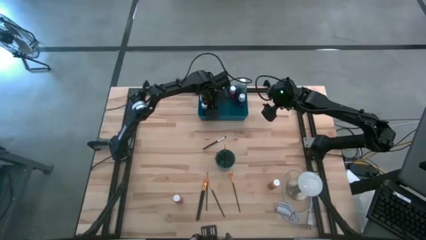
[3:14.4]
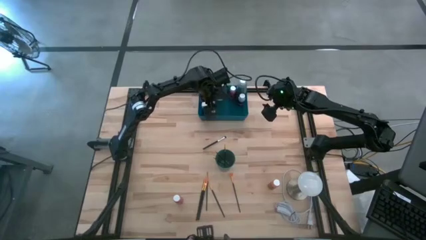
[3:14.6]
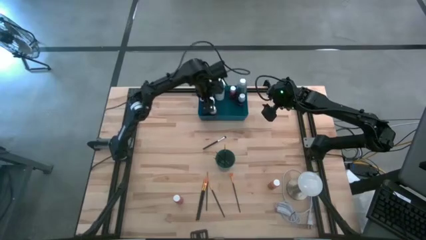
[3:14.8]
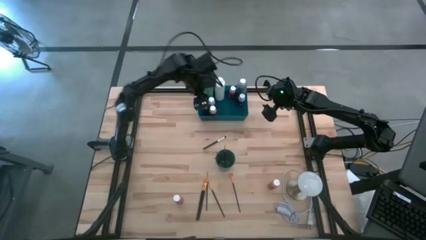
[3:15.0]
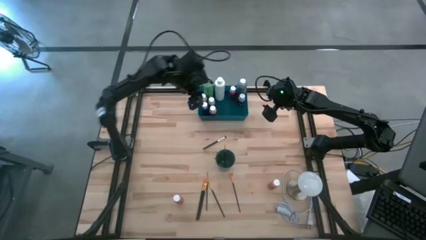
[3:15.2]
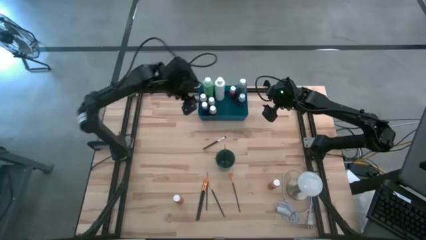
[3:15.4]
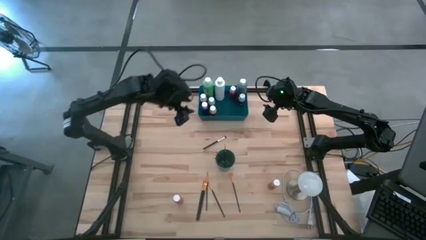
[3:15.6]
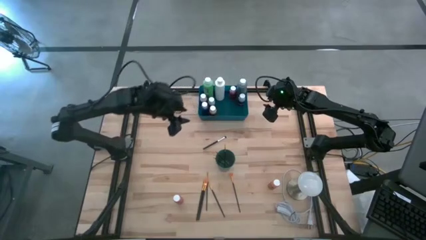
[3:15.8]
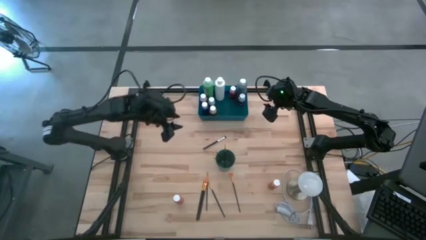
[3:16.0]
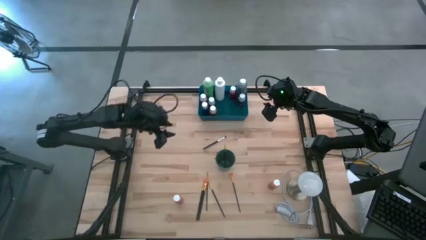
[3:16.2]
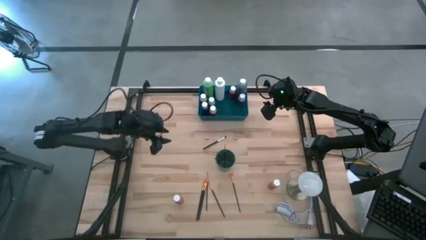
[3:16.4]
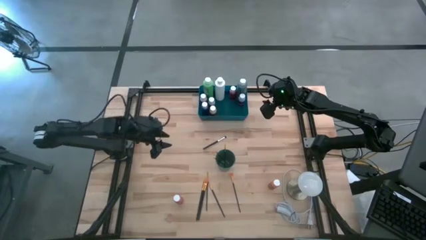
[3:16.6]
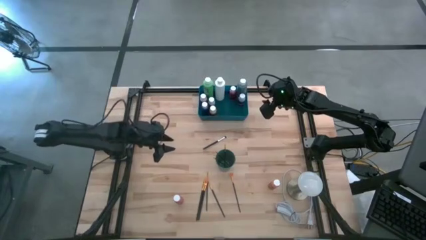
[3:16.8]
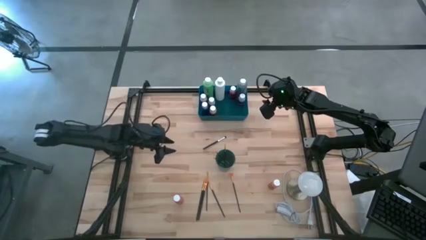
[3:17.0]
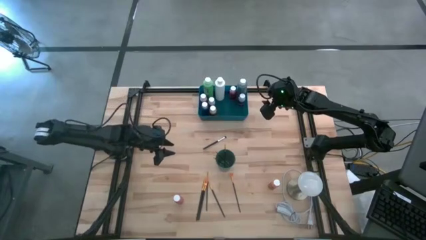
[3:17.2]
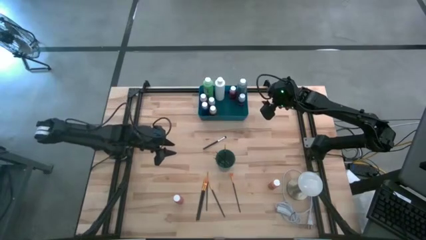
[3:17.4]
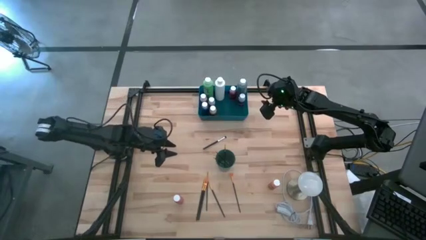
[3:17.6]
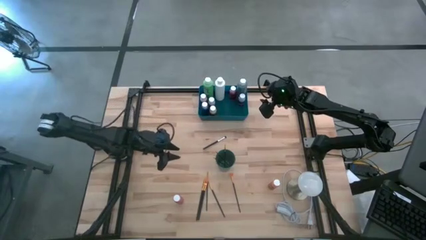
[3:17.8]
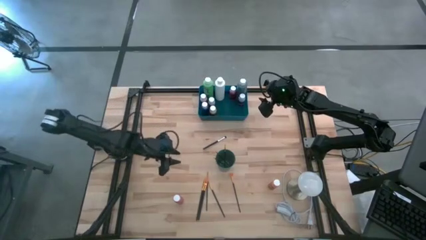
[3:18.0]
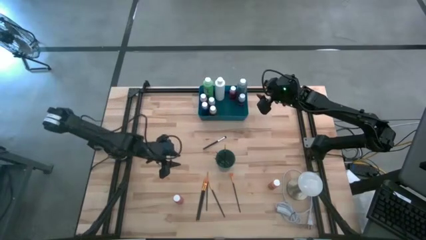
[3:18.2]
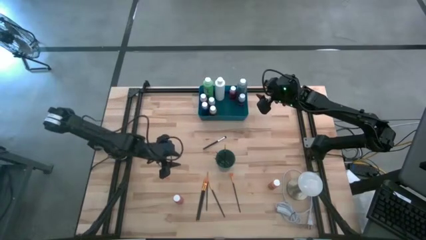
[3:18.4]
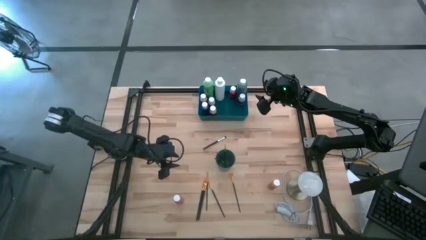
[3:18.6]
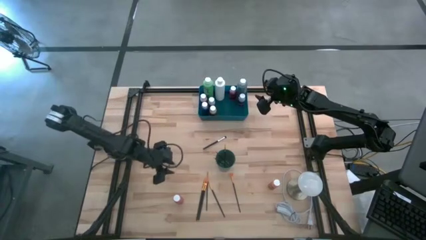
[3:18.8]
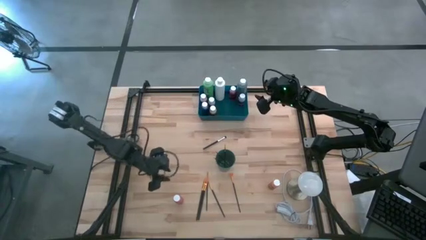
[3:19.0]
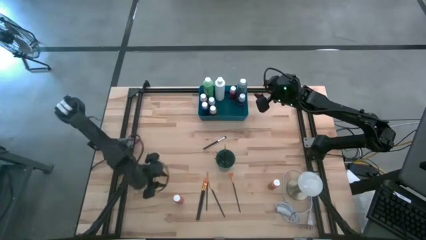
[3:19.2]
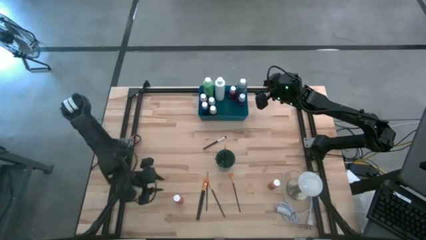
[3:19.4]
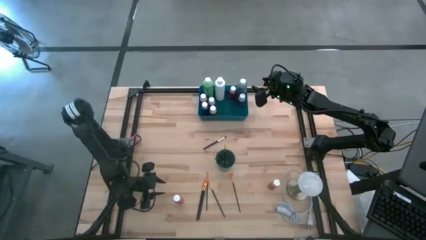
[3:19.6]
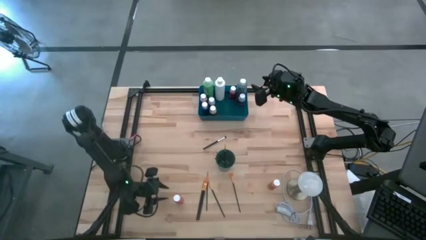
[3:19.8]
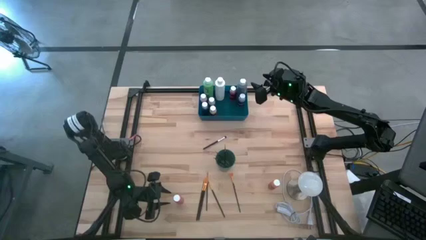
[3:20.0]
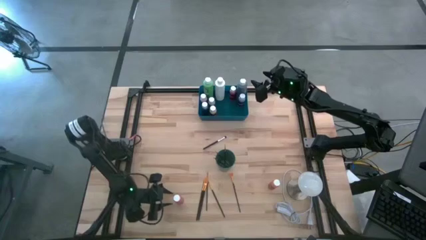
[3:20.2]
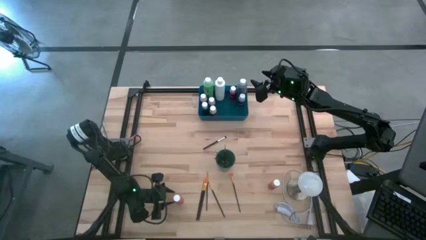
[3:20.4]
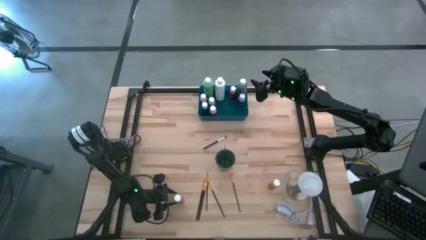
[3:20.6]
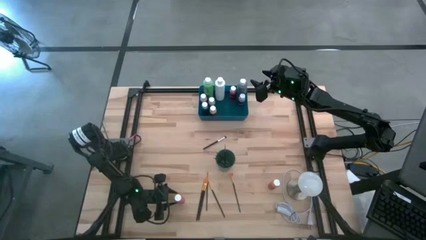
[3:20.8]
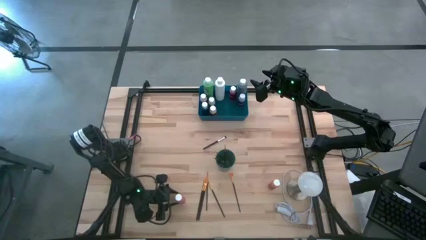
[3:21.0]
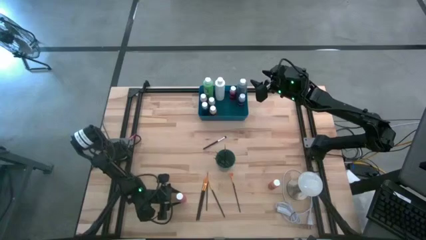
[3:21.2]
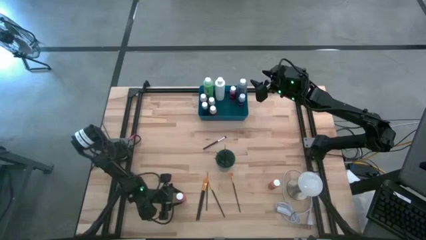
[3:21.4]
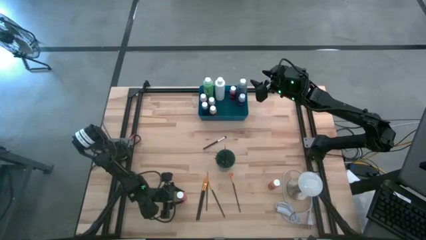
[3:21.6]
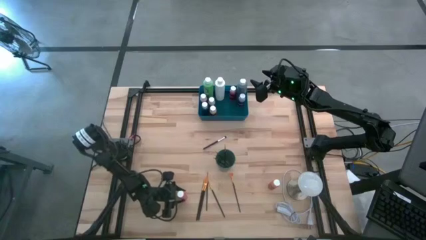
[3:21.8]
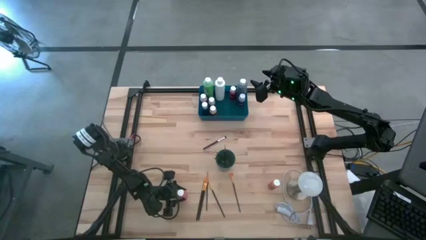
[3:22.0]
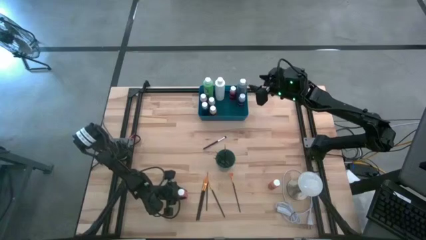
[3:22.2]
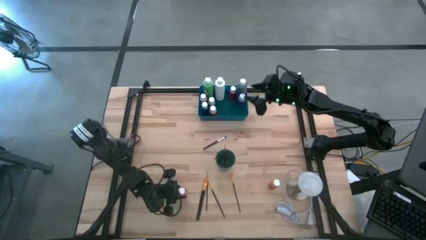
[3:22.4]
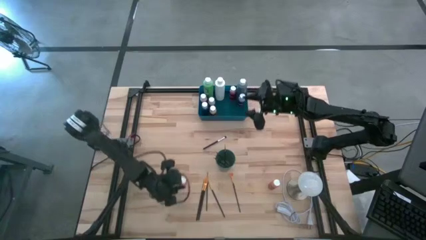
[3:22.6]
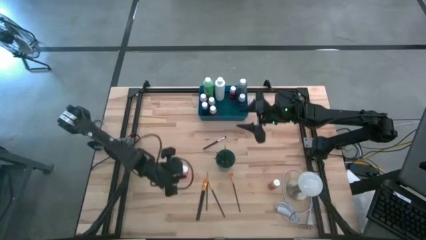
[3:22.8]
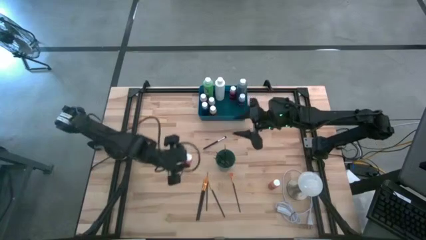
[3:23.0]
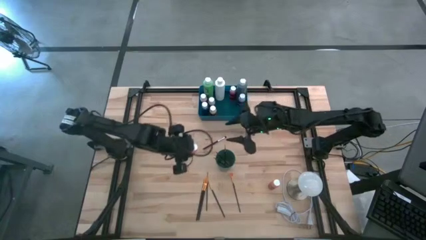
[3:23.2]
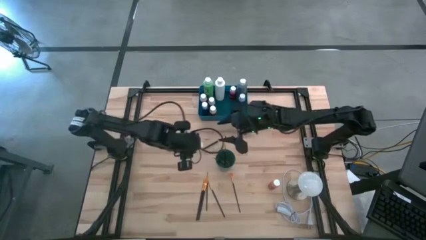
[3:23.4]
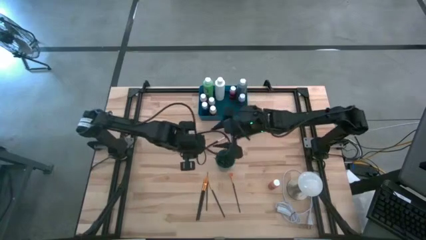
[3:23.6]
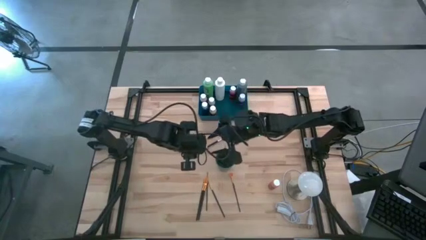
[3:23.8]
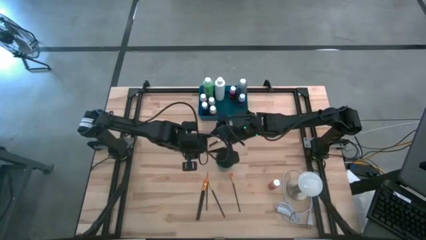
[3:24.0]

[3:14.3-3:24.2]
Task: Pick & Place Paint Supplies
Put the orange paint bottle into the blue bin
